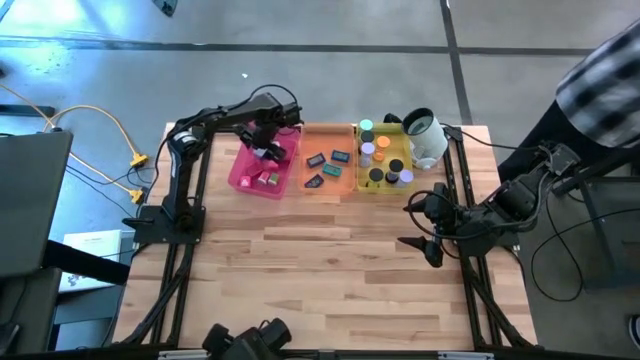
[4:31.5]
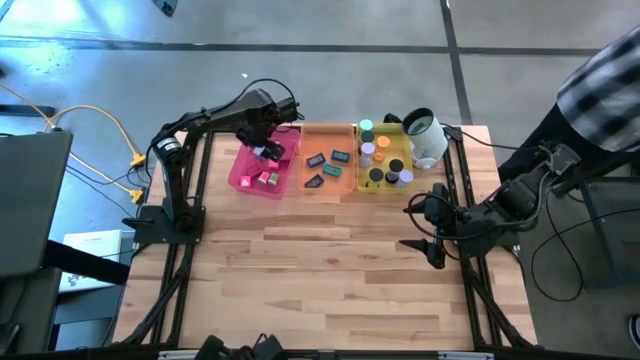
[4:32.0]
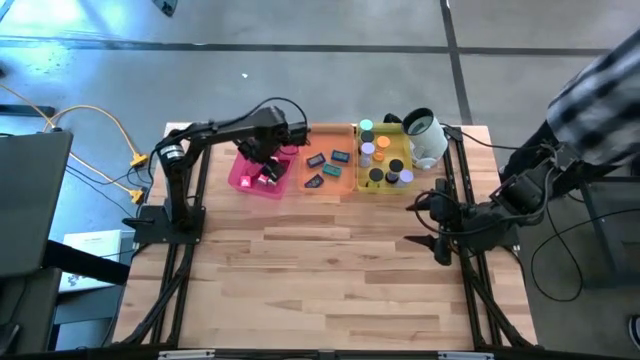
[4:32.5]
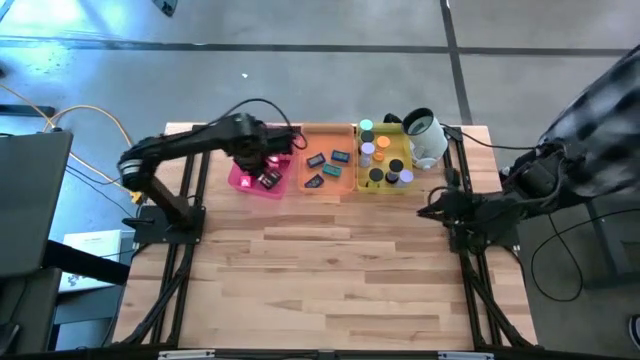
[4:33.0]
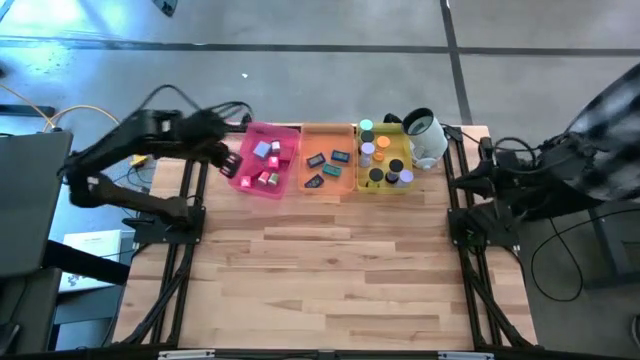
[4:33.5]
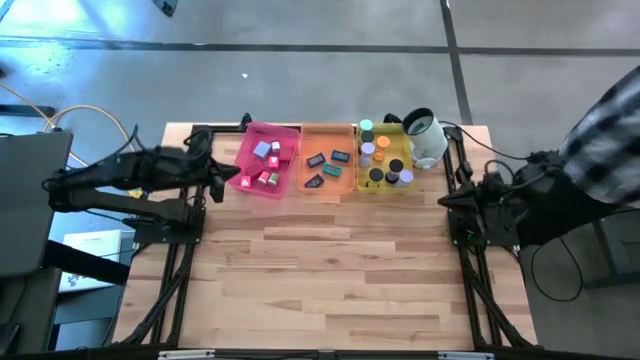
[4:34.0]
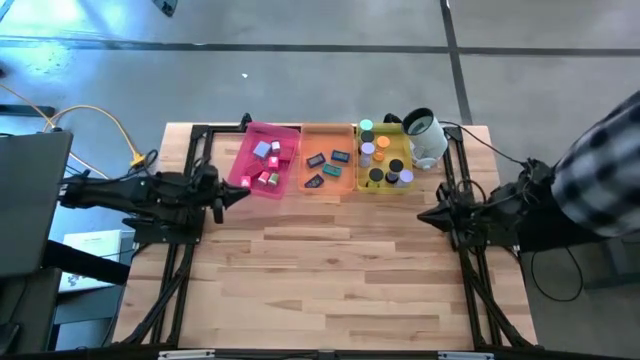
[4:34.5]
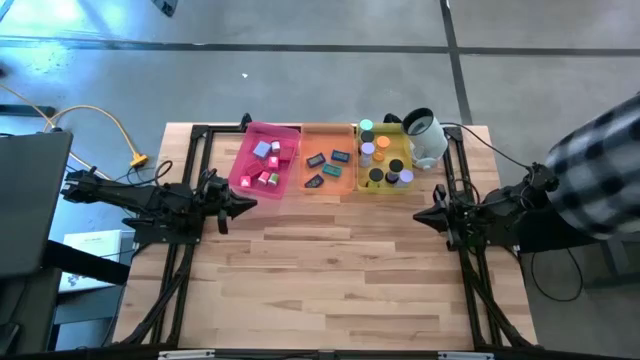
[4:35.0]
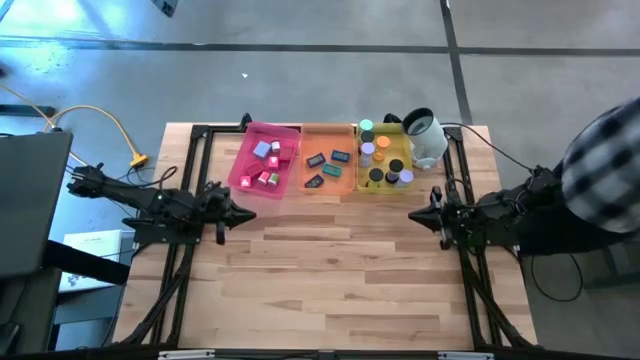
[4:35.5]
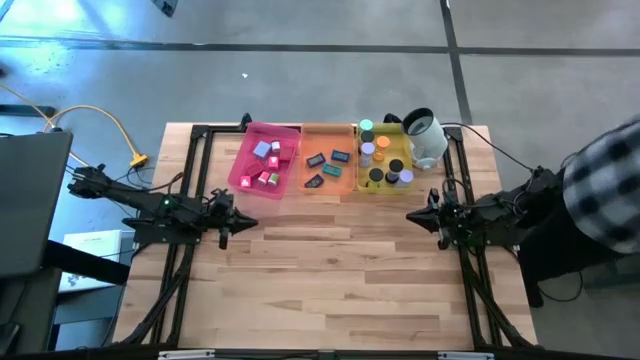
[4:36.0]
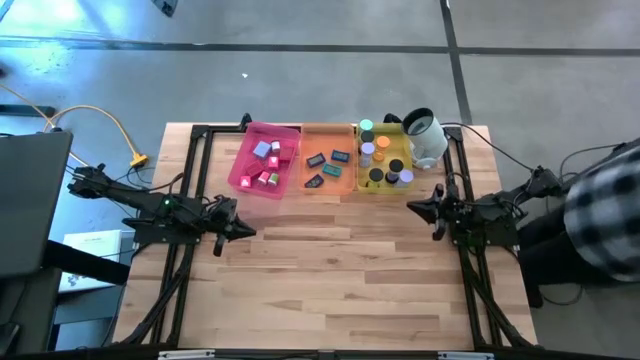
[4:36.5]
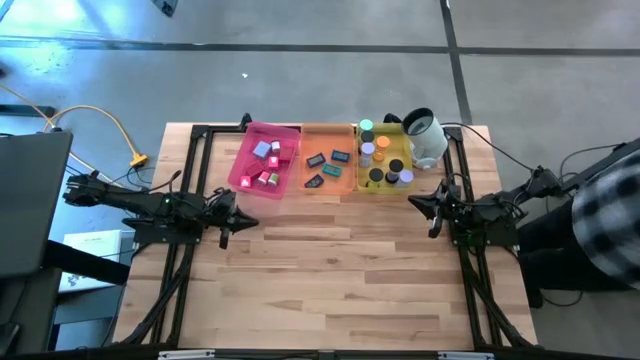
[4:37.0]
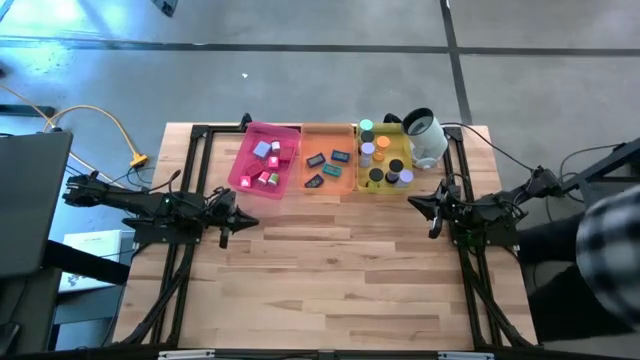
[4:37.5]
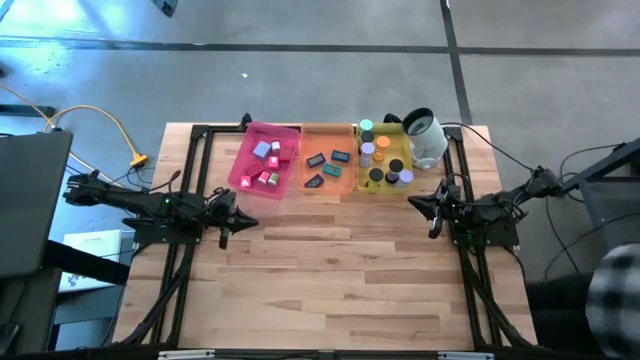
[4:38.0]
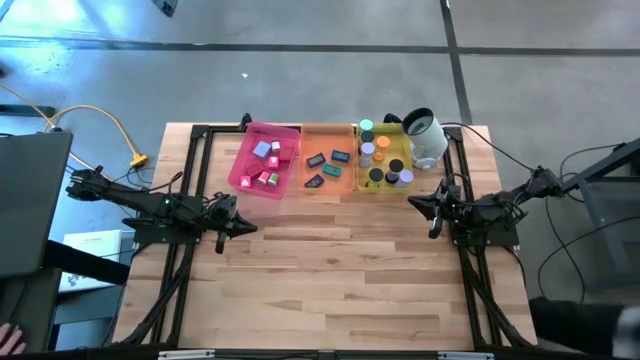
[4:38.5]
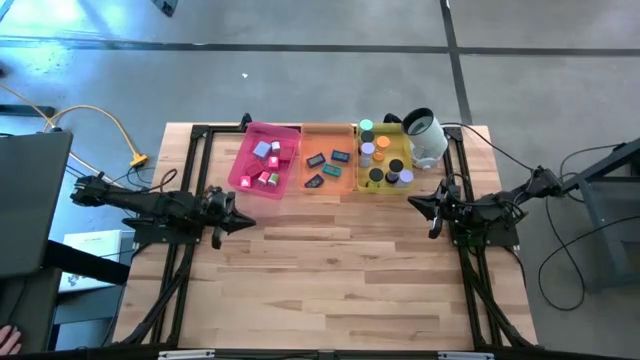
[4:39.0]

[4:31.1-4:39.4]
Task: Pick & Place Office items
Return to Home Position

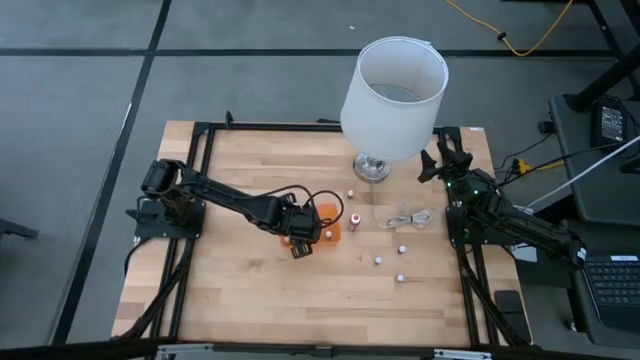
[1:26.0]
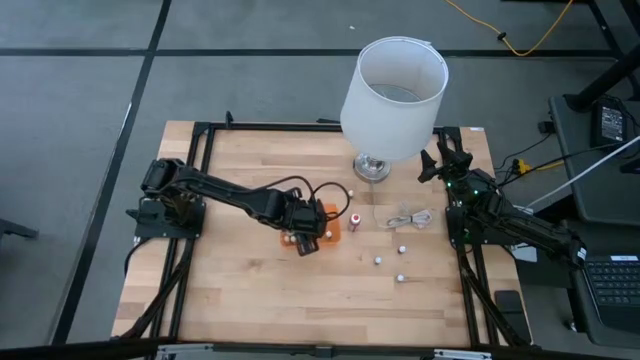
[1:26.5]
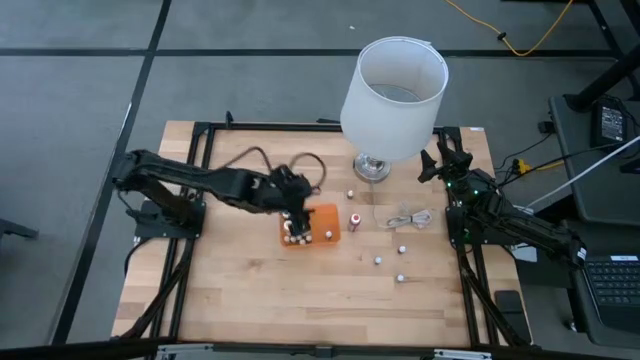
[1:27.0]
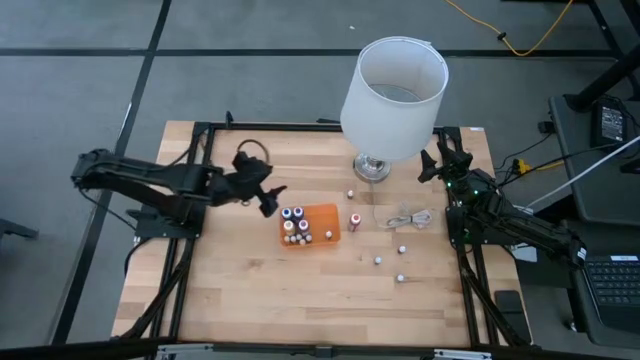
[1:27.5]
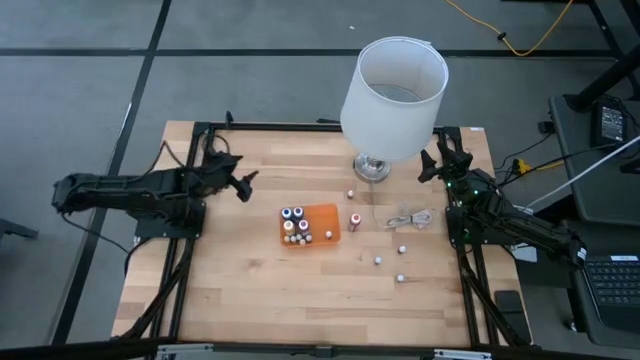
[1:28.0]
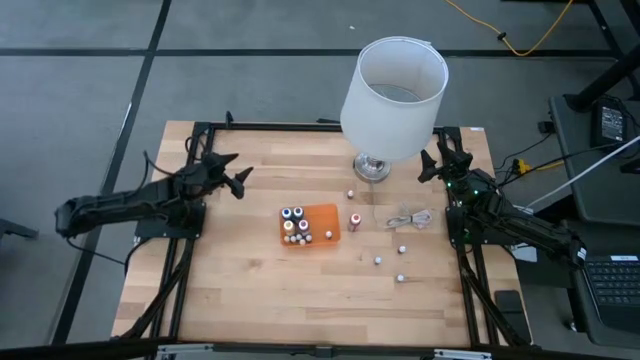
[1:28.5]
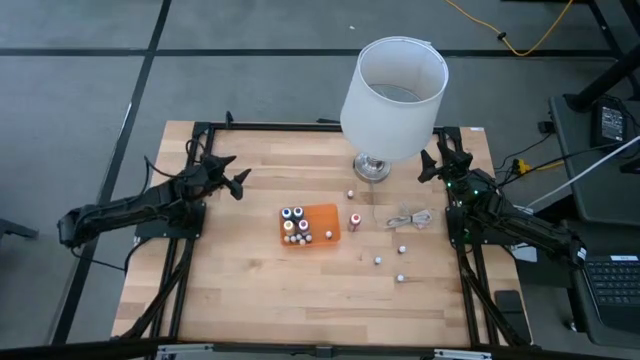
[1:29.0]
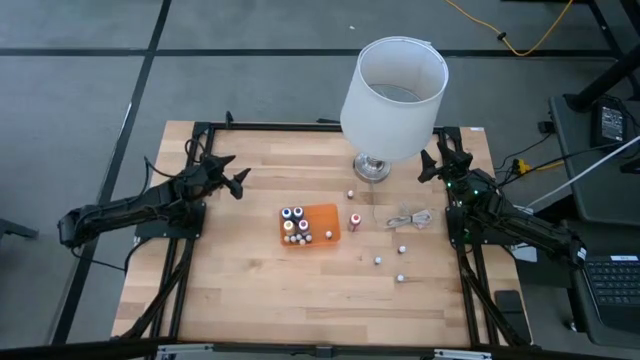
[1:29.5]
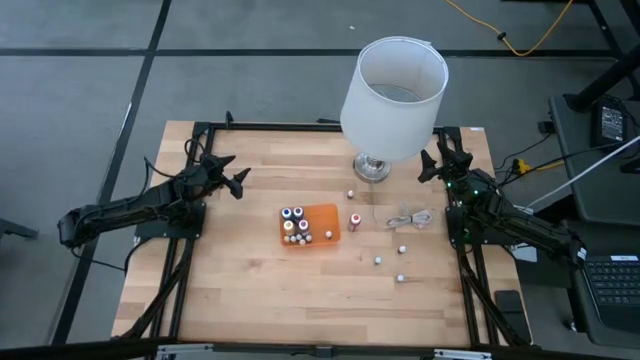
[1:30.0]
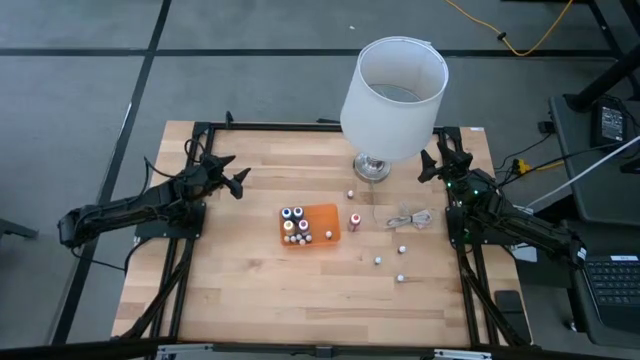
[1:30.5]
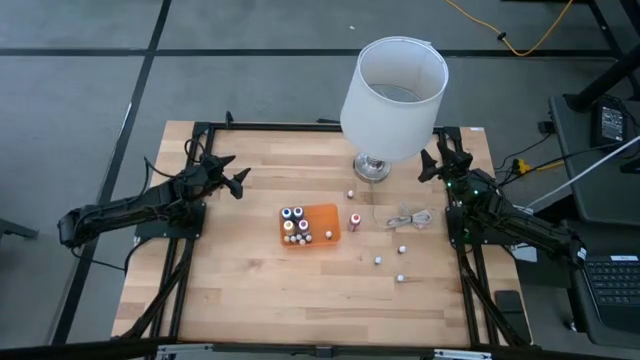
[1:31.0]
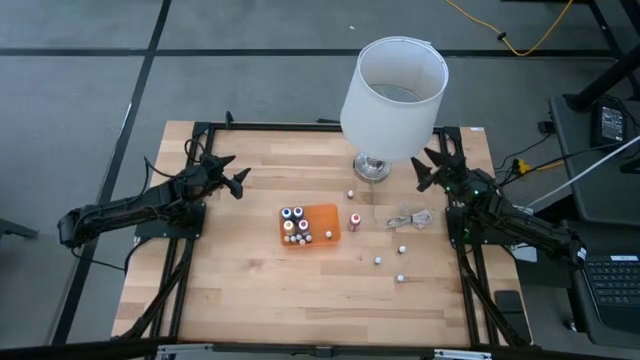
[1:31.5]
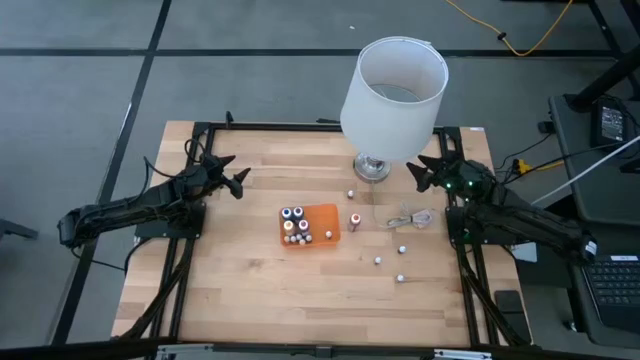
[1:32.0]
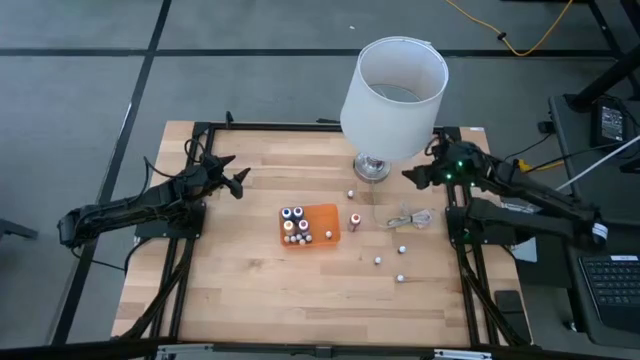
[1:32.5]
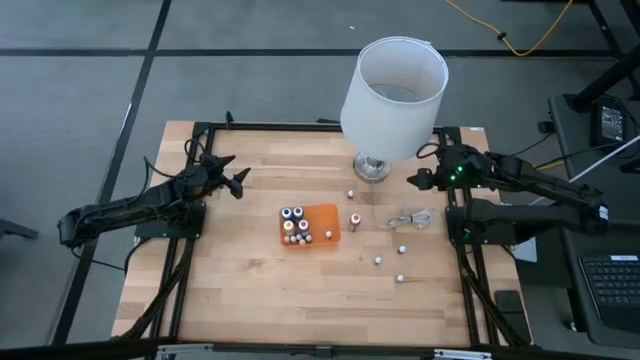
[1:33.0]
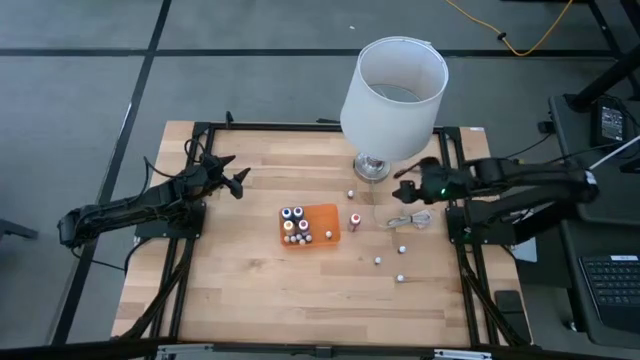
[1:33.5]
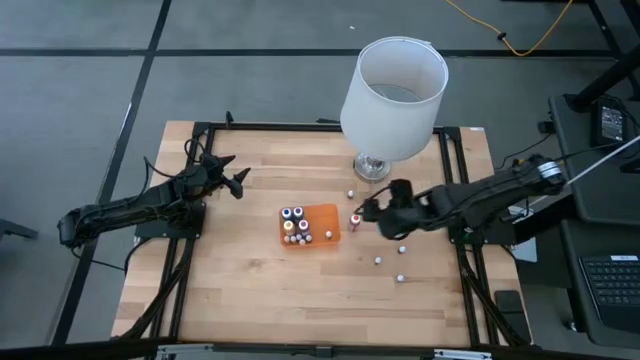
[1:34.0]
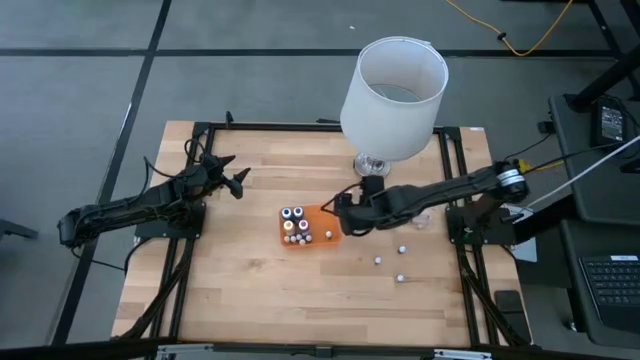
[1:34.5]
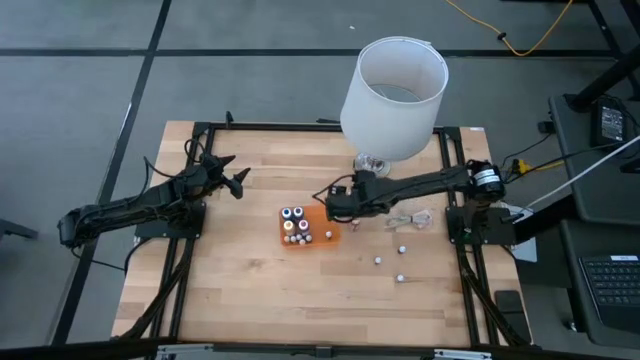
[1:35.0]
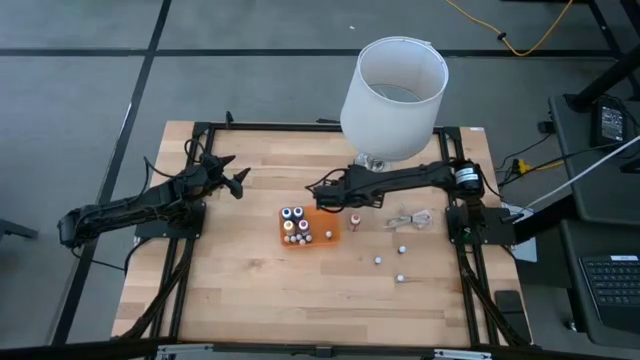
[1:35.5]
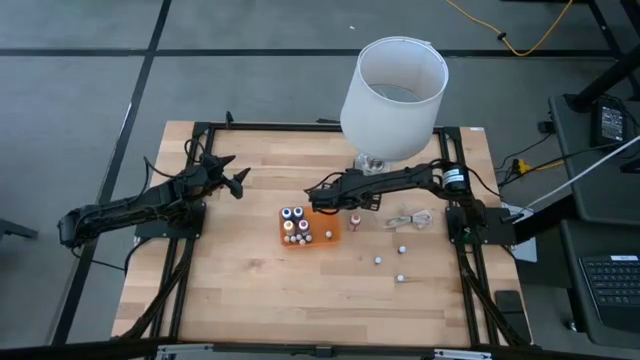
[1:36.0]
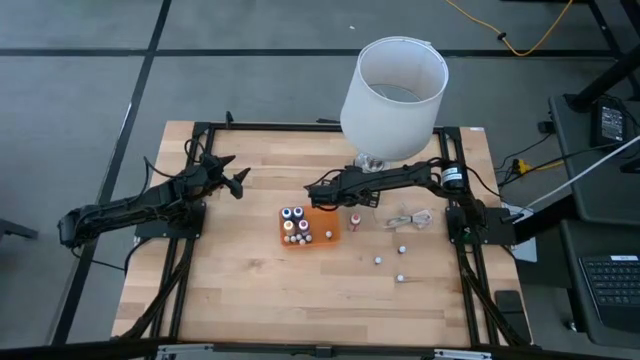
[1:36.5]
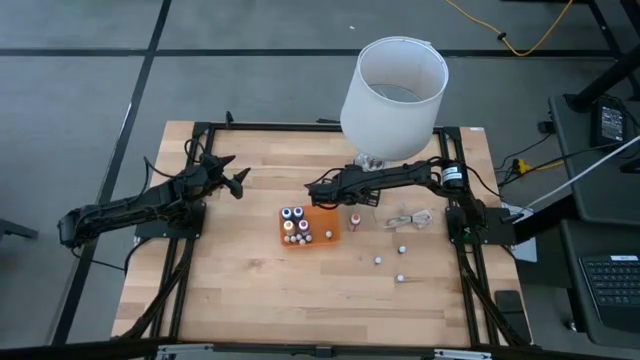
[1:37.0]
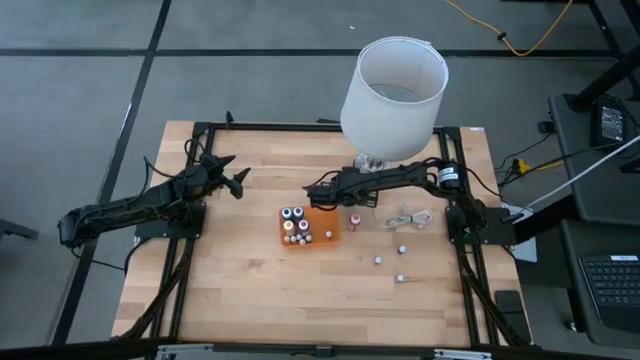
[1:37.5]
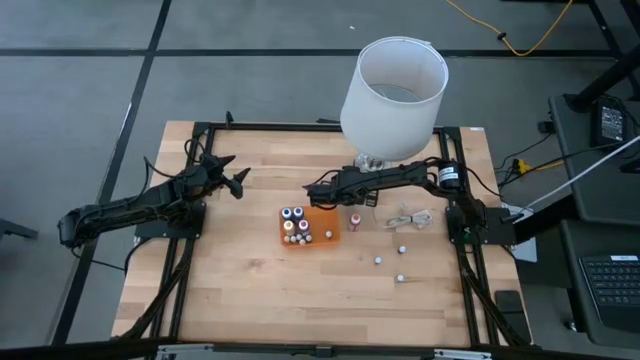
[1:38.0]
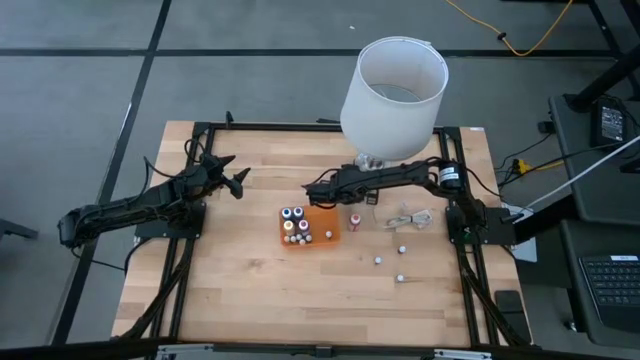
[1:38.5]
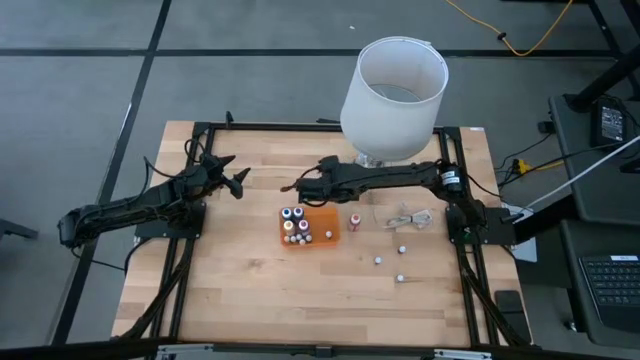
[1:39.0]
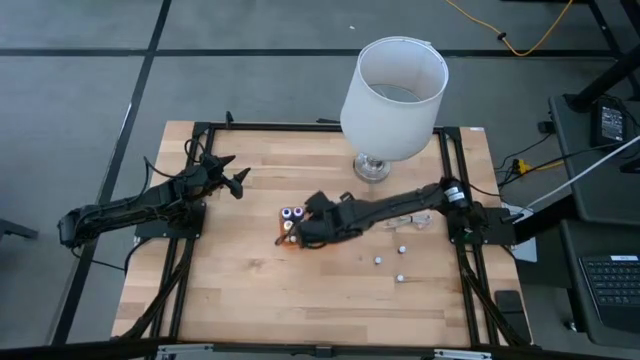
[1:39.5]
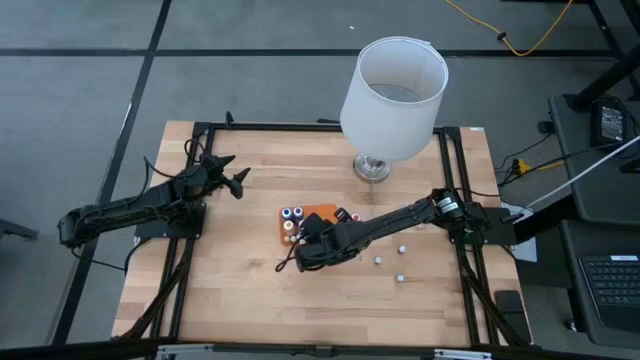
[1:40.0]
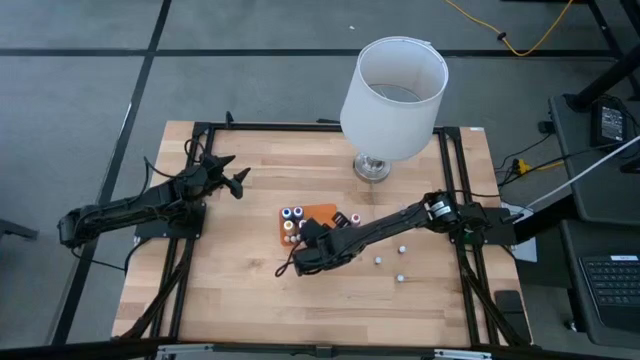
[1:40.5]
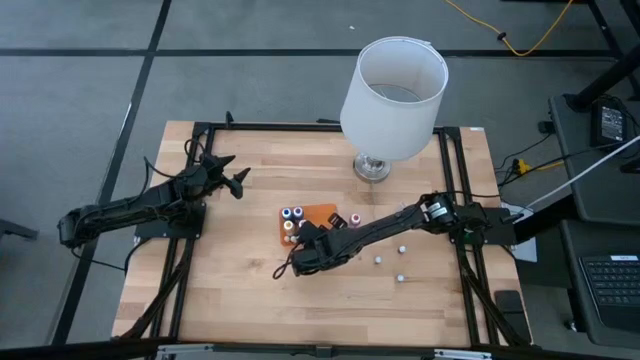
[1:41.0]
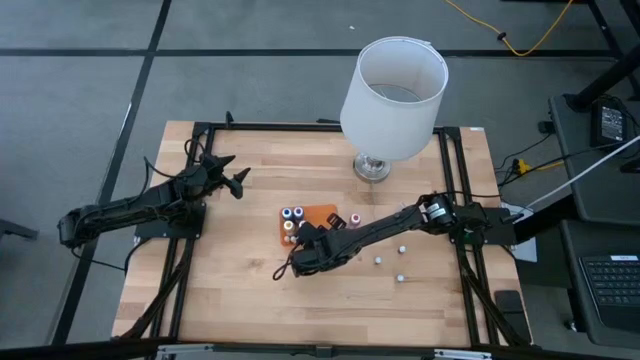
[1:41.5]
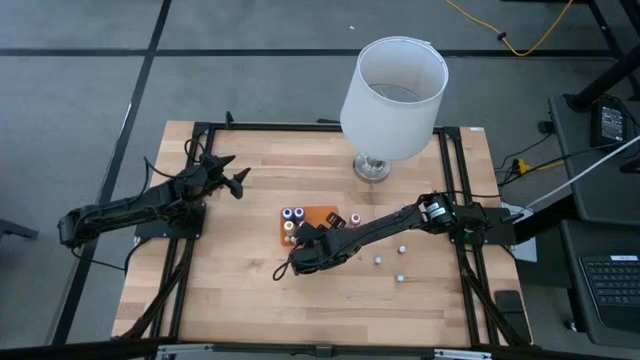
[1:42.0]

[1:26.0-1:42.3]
Task: Pick & Place food coloring
Put the small orange food coloring bottle into the orange bin
